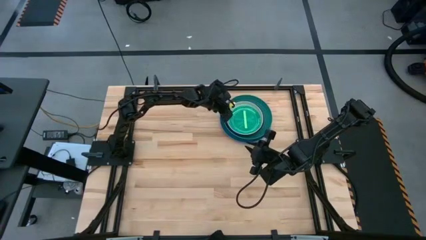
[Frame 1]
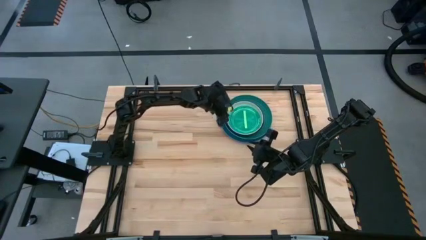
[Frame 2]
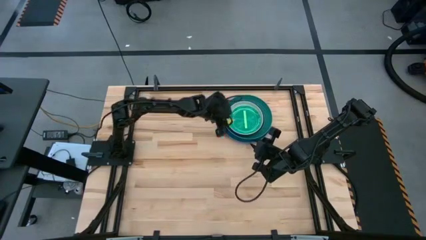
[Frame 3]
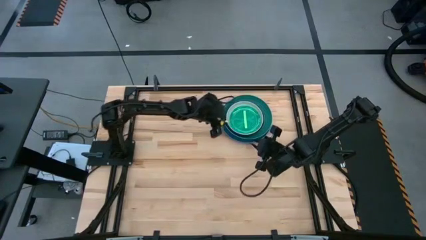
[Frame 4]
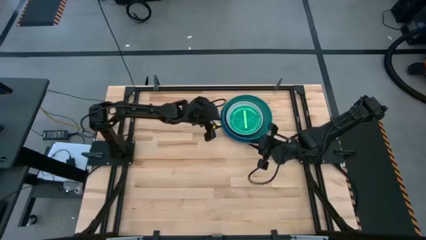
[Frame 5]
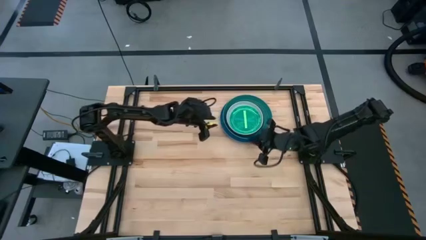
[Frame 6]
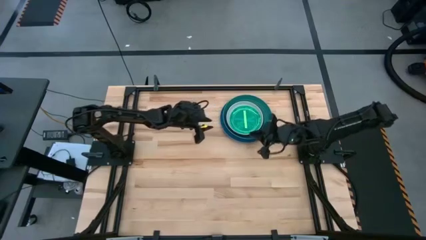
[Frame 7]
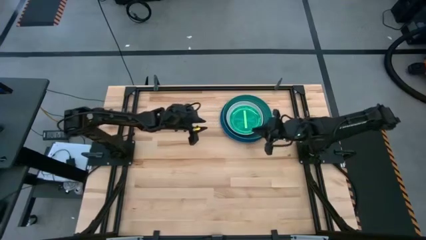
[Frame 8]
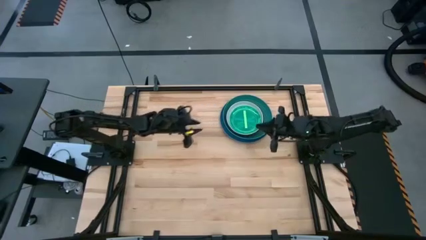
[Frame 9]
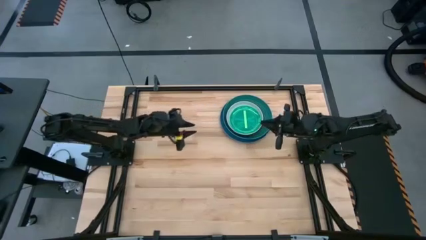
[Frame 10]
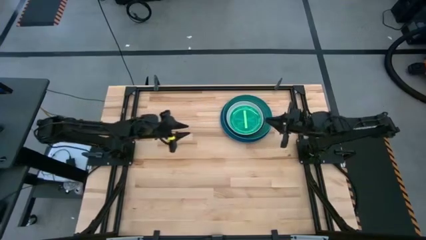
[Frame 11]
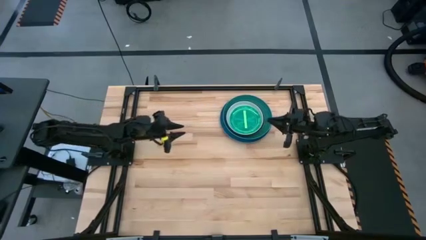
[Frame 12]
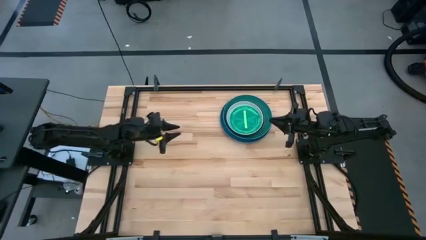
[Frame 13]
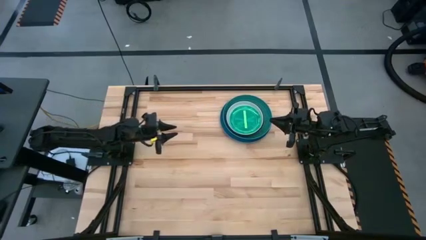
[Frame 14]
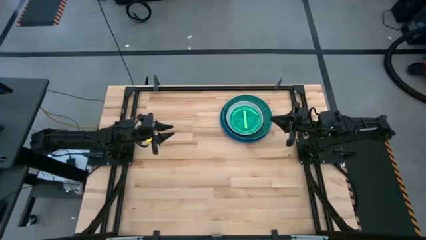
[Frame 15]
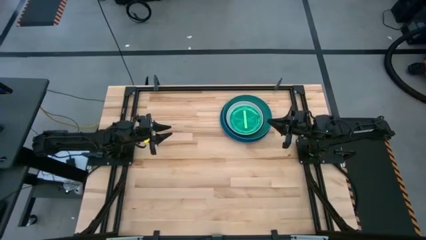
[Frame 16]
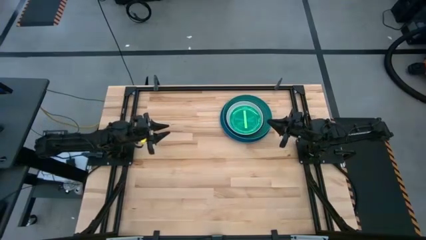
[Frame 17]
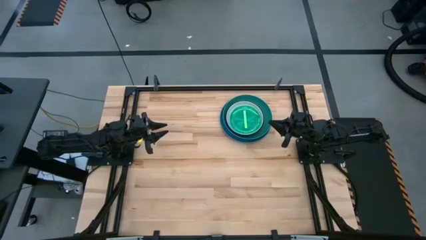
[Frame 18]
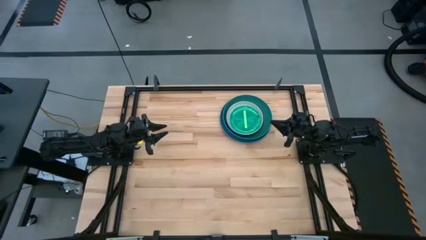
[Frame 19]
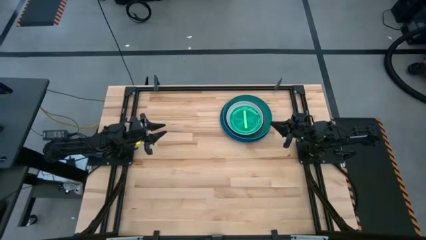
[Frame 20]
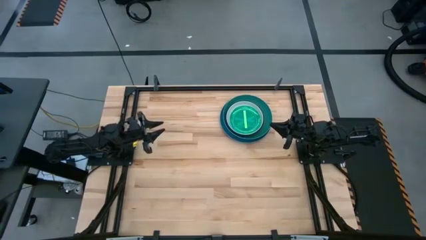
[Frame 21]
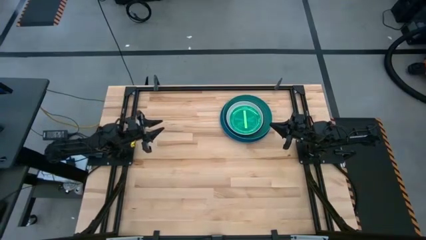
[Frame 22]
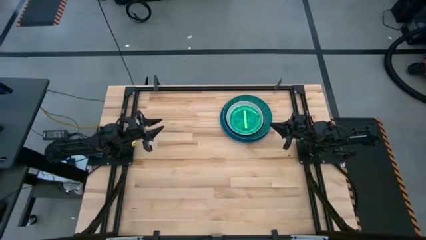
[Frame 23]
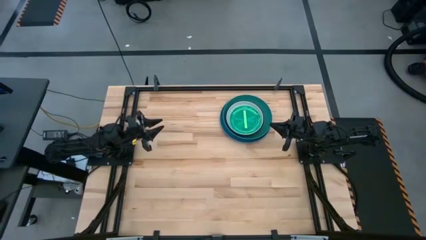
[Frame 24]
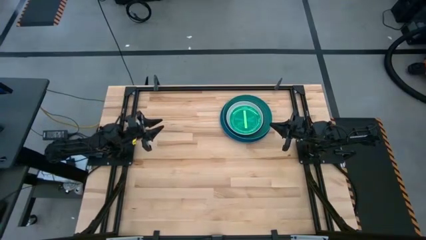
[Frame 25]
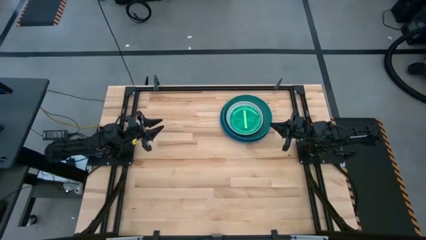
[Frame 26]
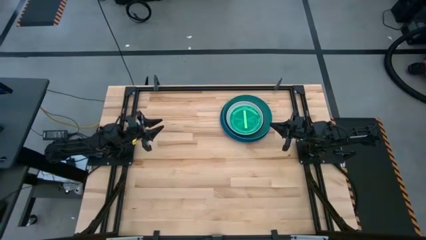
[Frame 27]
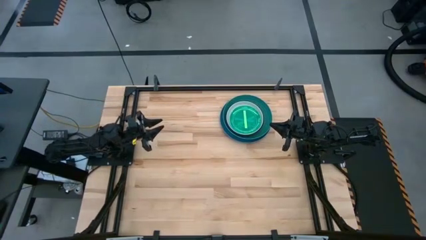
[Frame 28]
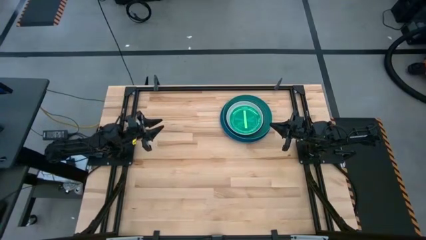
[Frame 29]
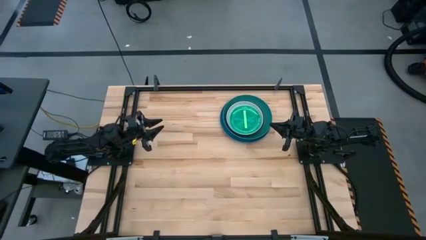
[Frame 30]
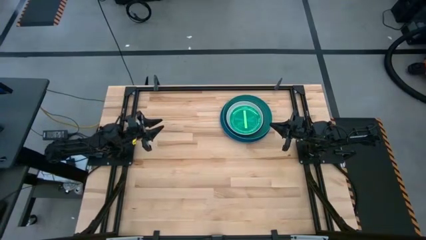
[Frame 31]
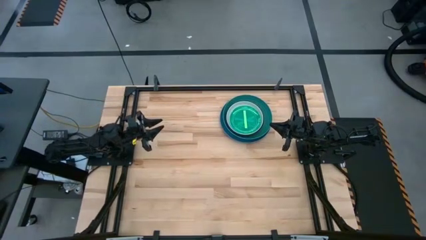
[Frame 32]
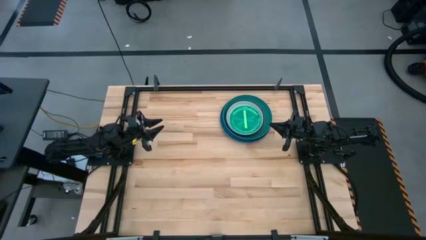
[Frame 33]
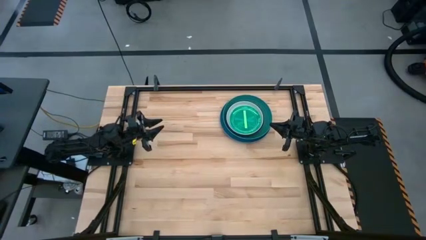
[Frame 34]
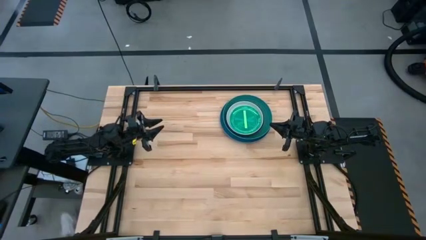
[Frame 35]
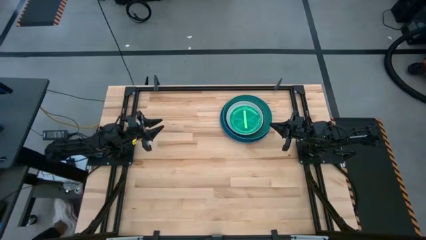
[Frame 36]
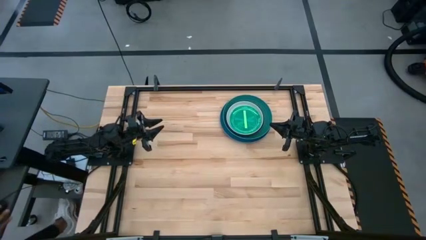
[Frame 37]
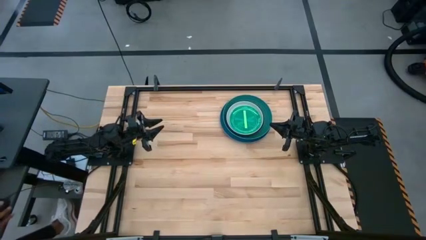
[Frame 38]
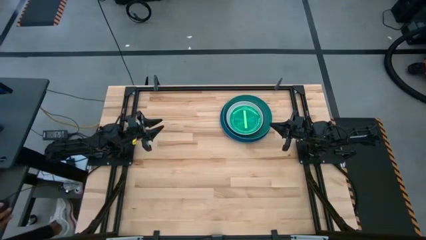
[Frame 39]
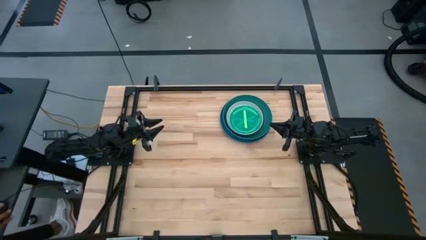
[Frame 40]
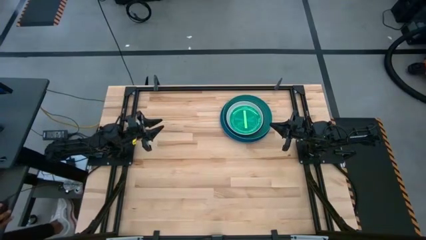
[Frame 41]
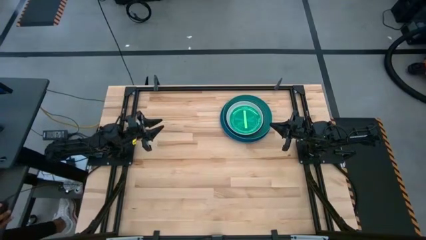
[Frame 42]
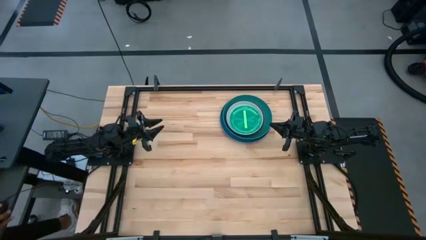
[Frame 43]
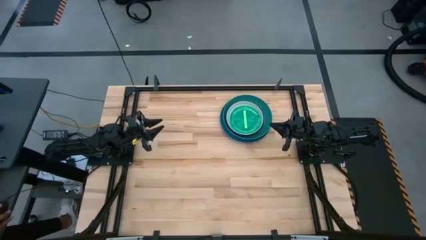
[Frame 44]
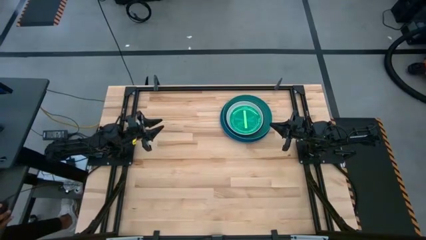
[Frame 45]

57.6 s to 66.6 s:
Task: Stack plastic plates
Return to Home Position

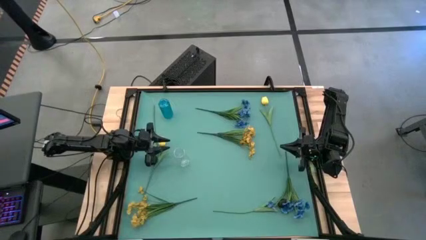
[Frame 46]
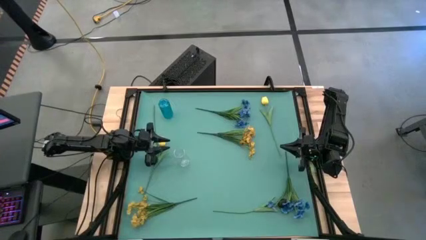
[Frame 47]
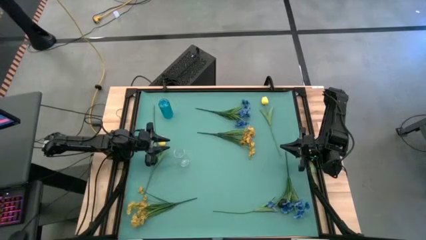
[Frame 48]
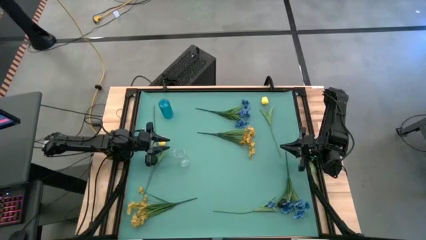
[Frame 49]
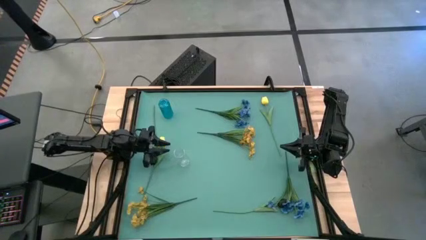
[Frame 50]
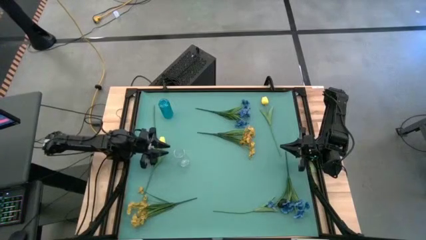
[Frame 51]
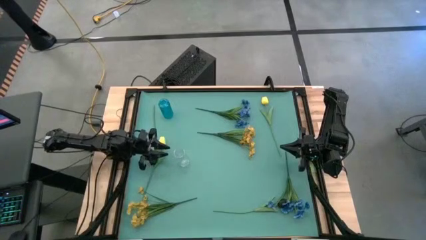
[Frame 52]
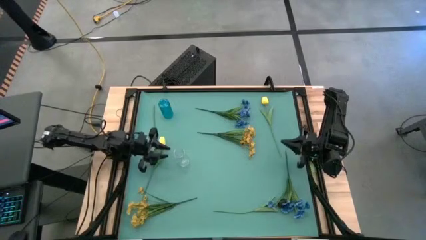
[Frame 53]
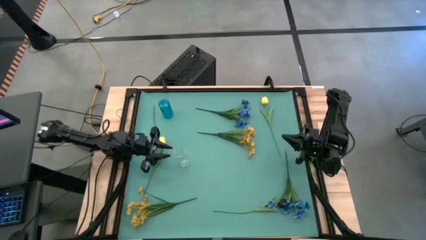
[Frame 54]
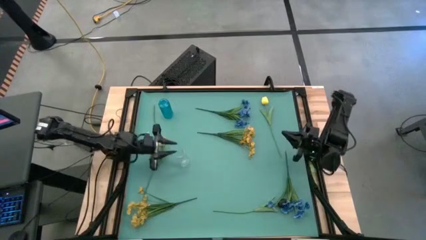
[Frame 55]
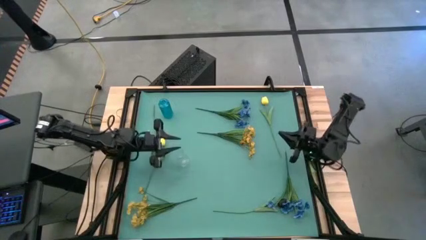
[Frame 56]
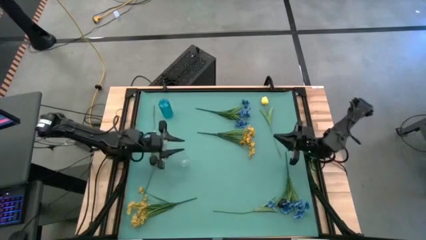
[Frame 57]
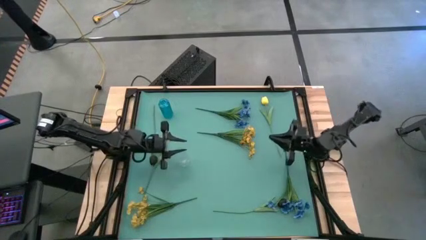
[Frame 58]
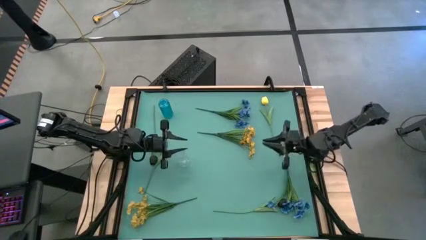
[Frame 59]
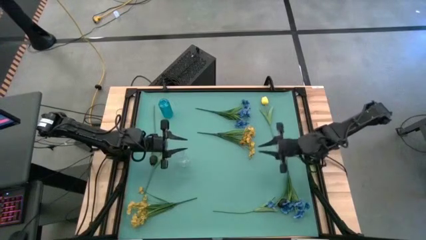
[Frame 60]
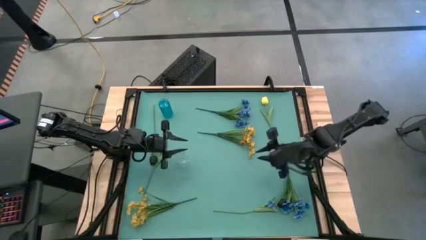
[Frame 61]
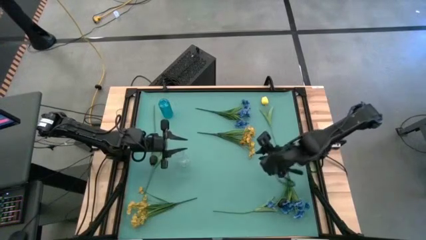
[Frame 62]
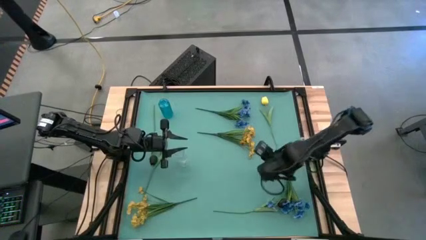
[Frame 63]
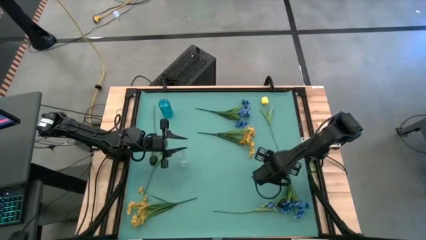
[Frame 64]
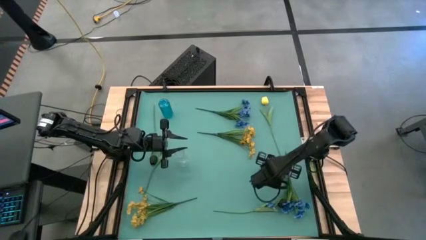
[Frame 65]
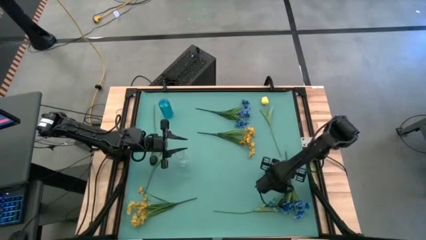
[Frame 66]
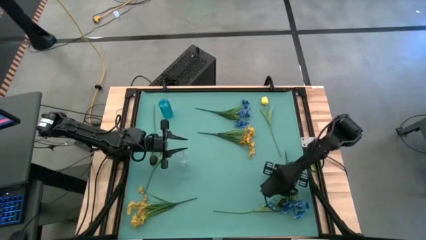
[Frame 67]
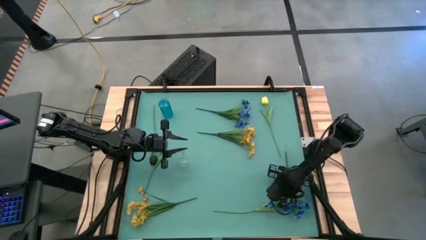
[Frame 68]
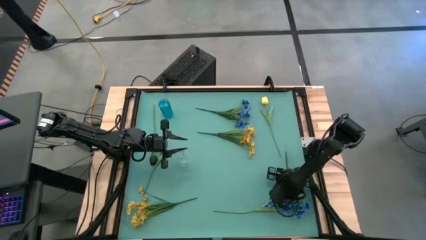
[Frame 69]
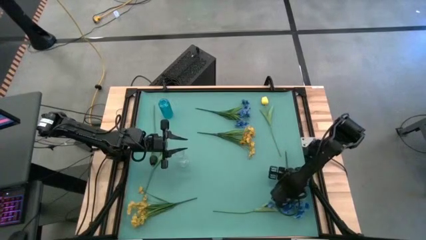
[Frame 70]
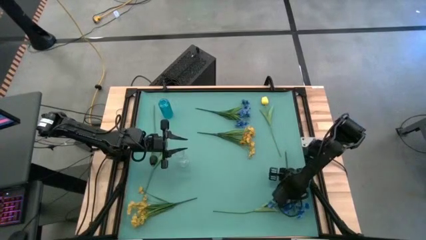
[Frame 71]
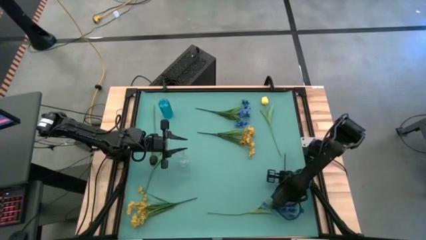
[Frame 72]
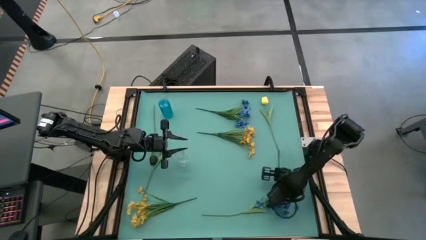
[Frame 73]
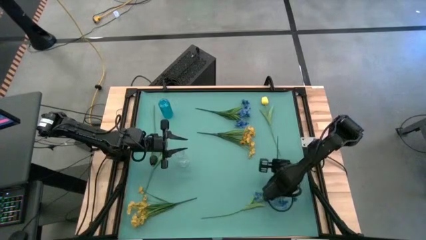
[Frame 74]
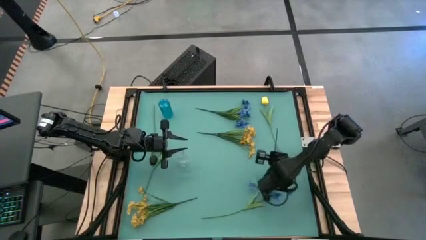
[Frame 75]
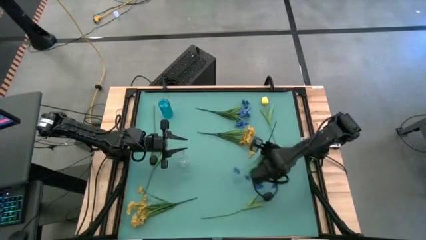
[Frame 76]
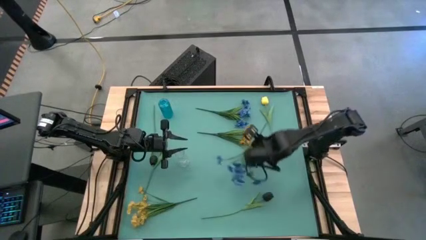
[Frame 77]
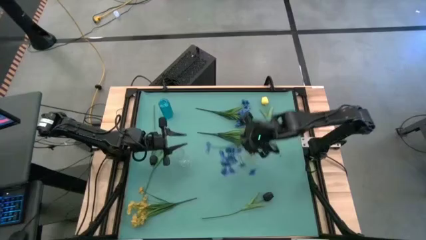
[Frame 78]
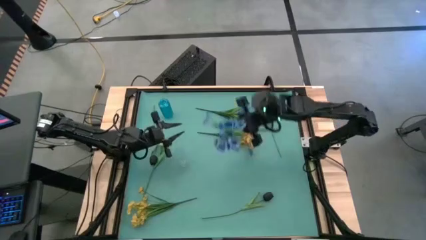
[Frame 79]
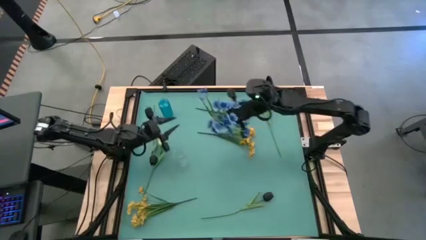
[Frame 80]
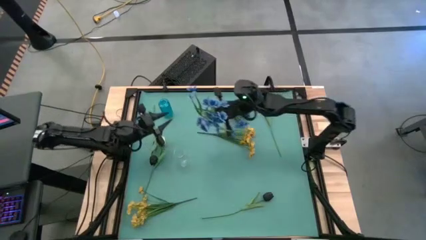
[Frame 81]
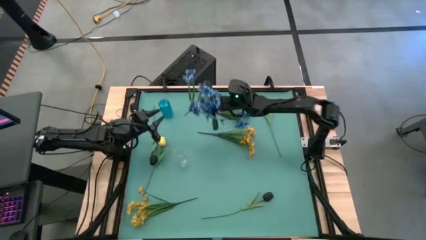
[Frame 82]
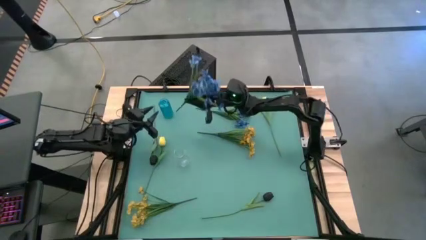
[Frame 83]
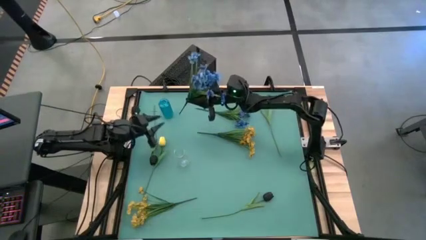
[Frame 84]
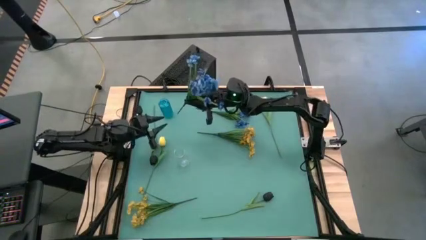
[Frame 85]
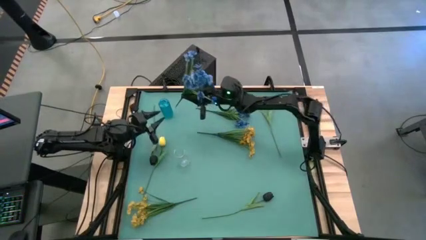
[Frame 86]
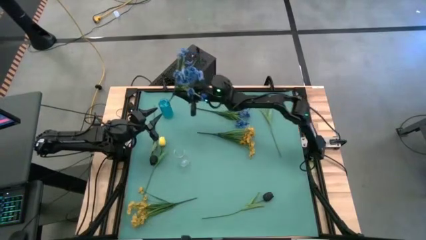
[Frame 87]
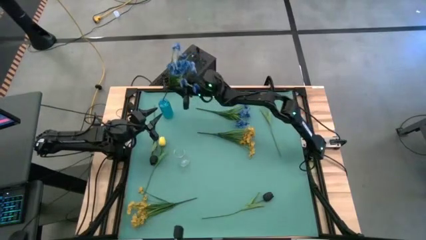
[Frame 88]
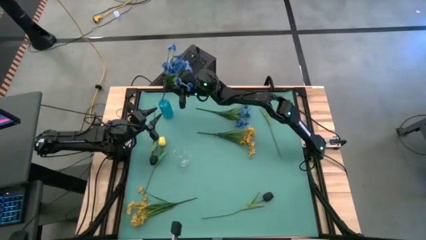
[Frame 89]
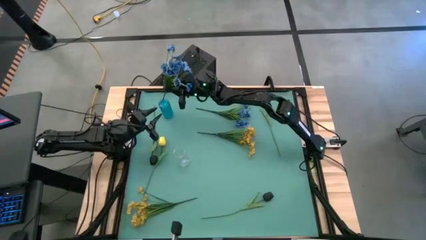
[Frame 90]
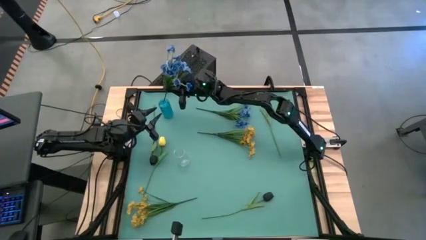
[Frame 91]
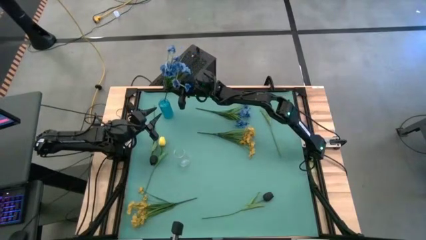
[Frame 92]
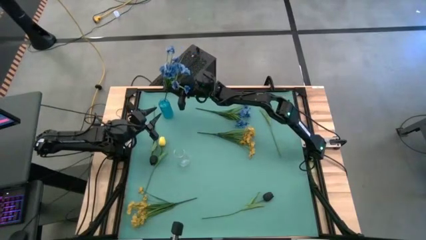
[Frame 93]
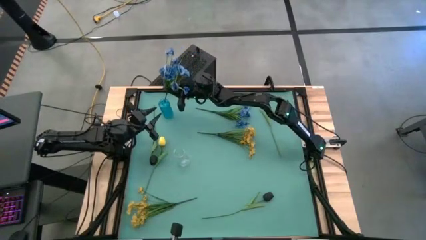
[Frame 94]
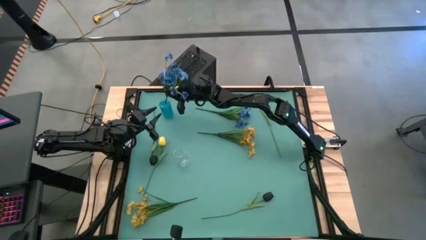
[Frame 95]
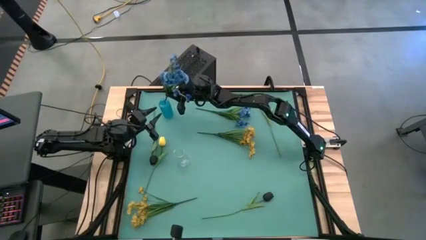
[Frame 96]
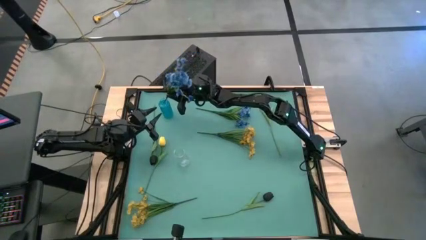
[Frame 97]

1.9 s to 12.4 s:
Task: Sort flowers into vase by color
Put the bottom blue flowers into the blue vase
